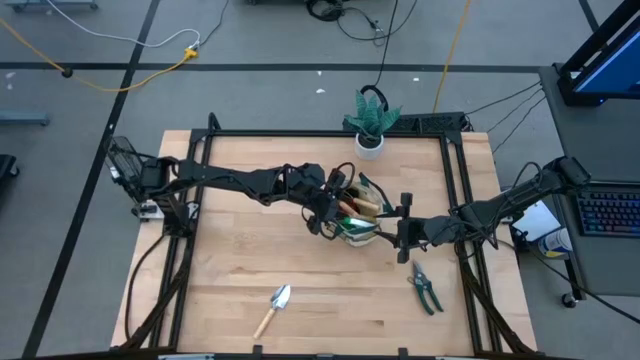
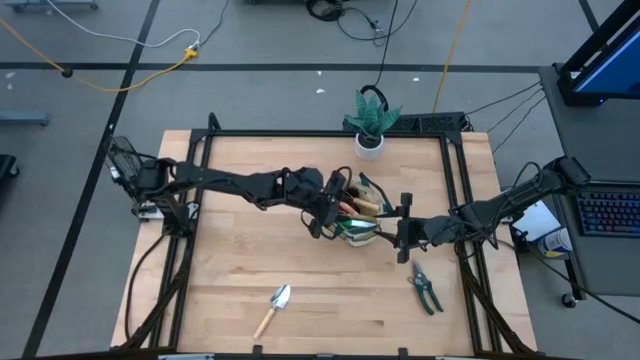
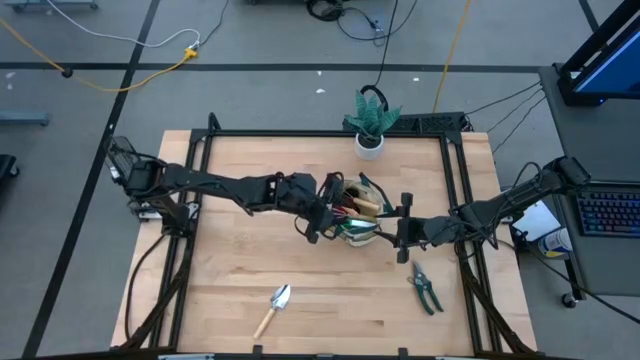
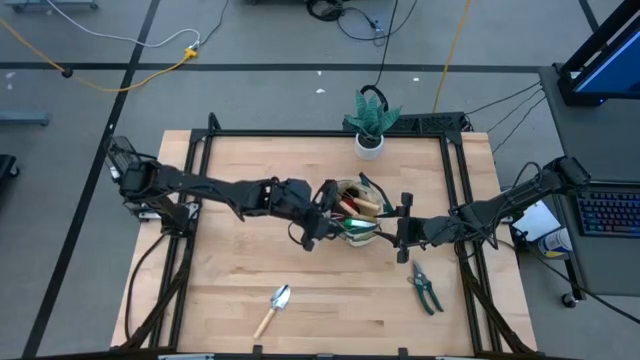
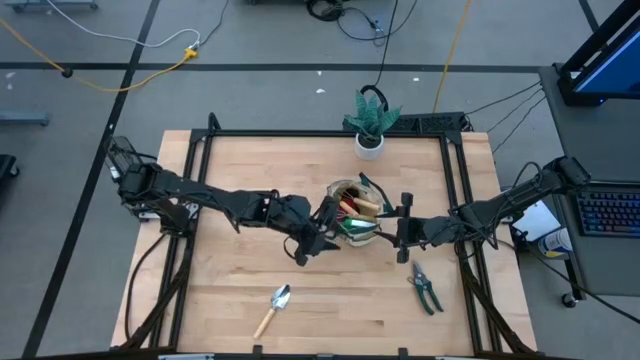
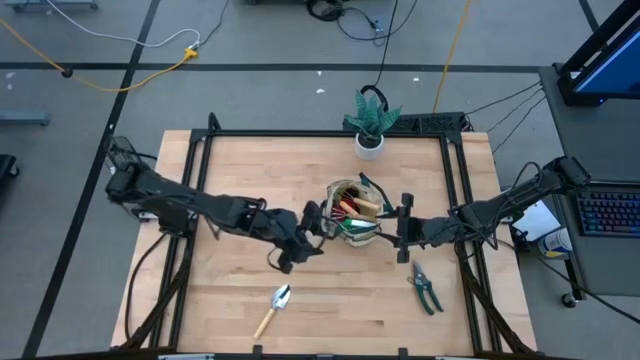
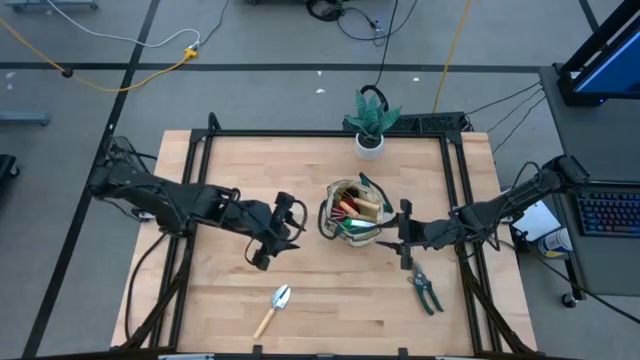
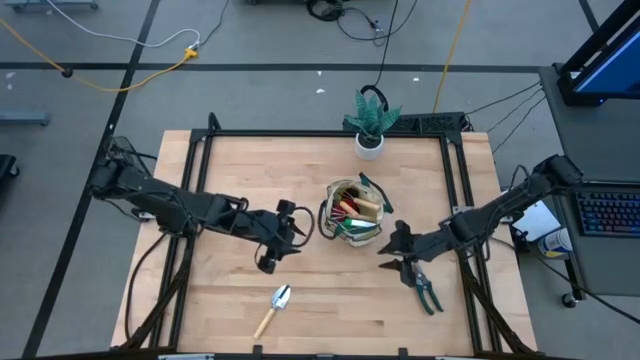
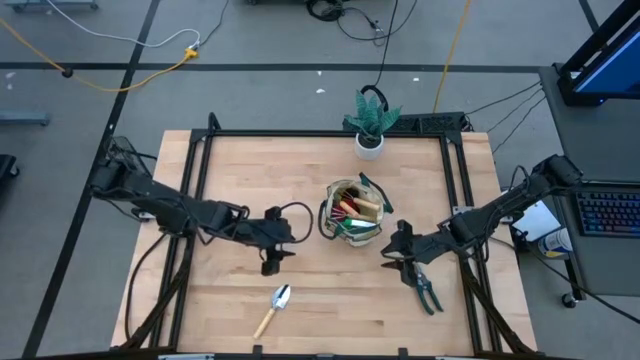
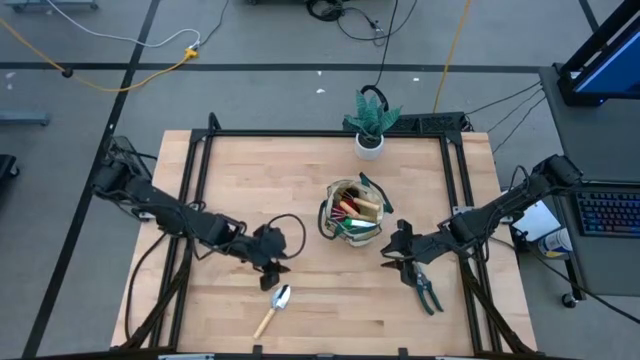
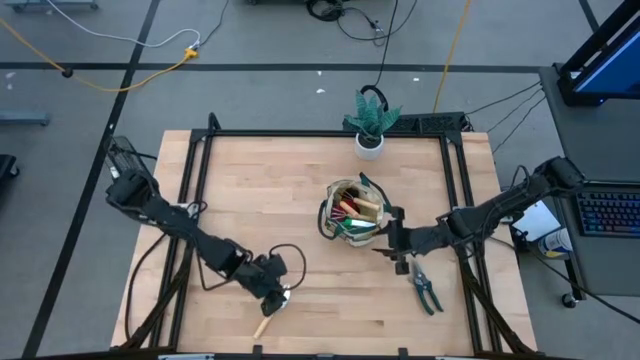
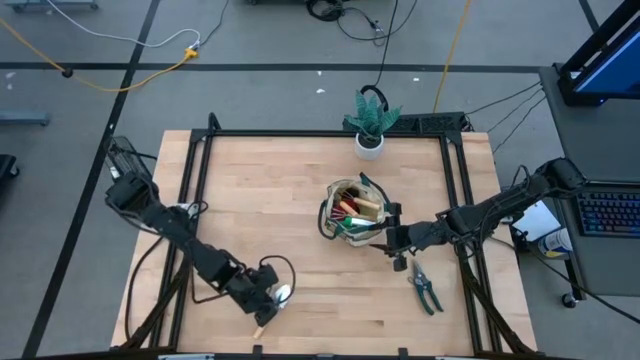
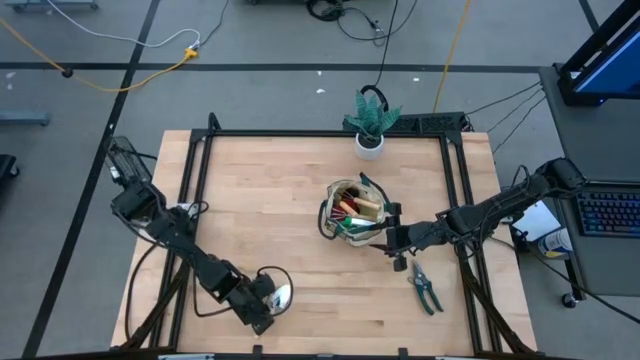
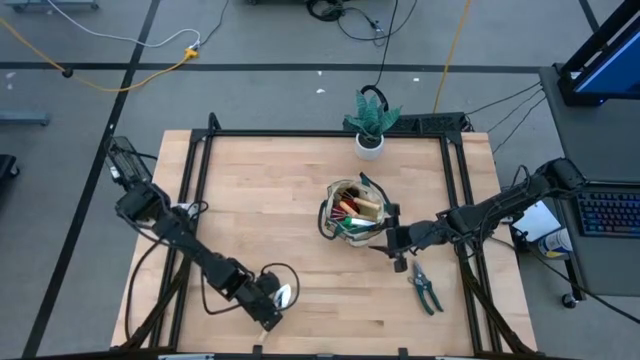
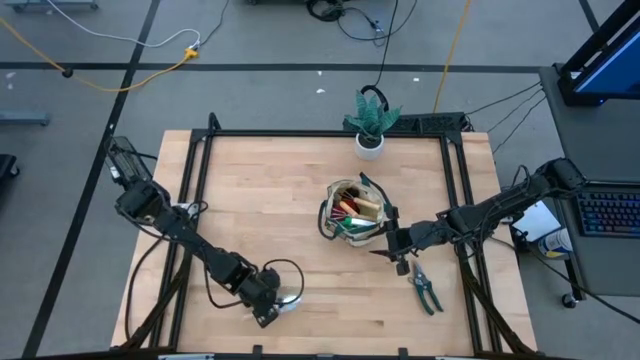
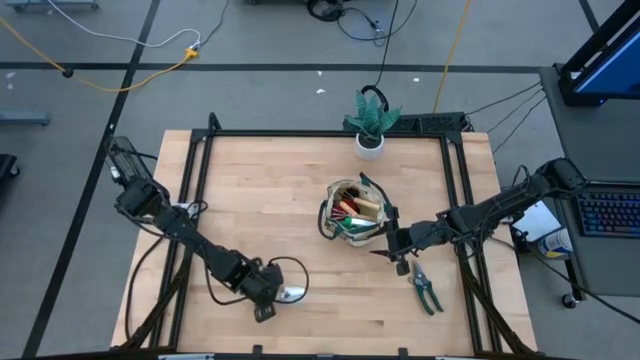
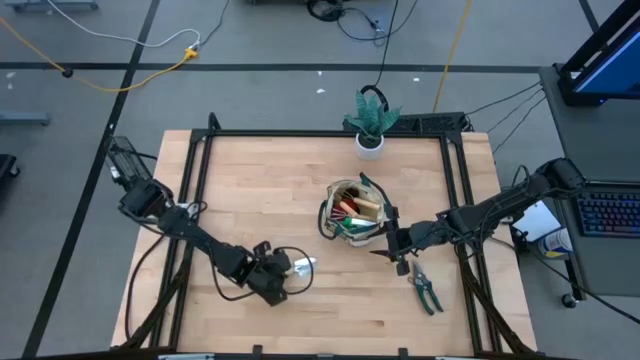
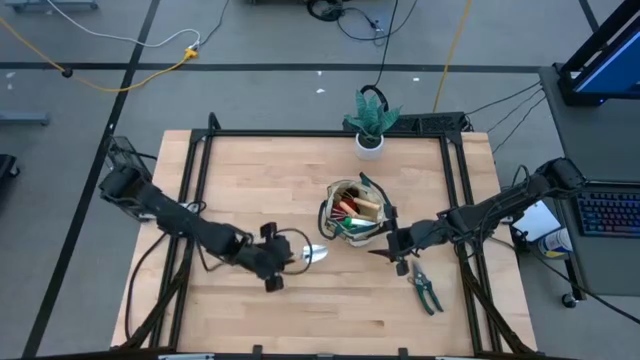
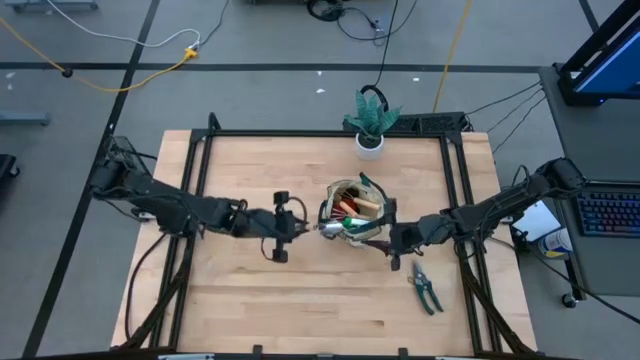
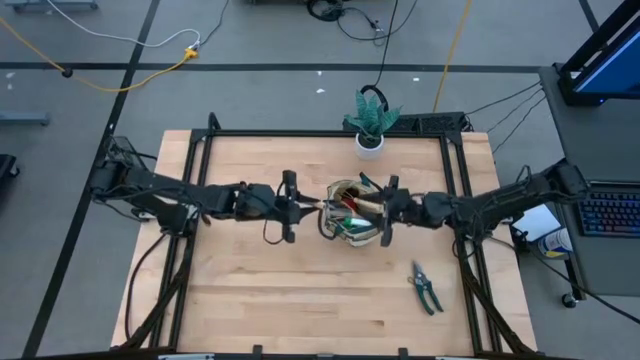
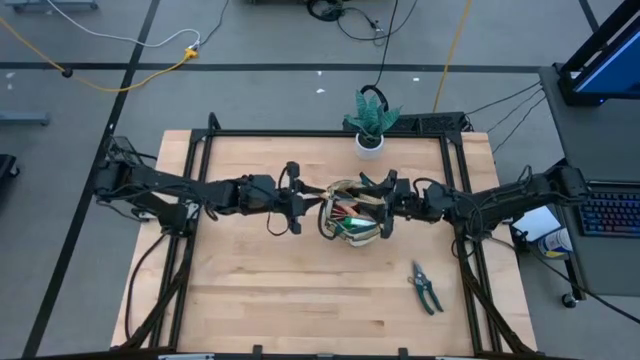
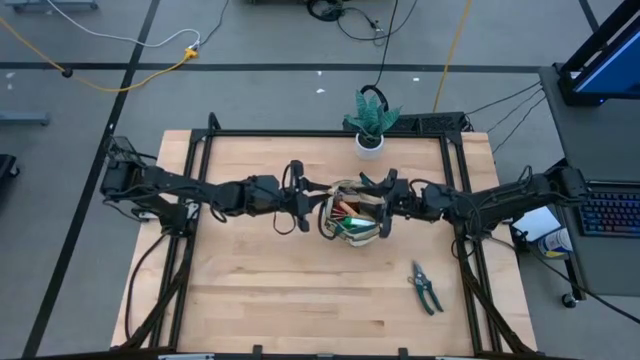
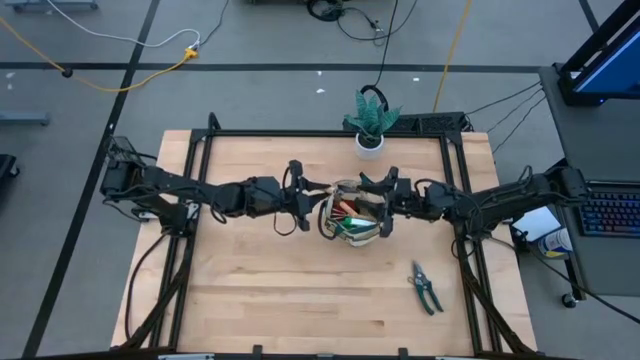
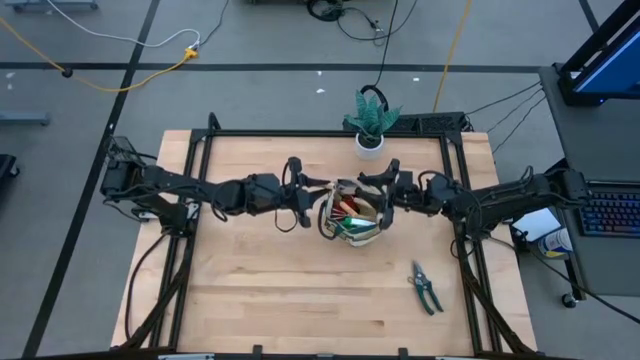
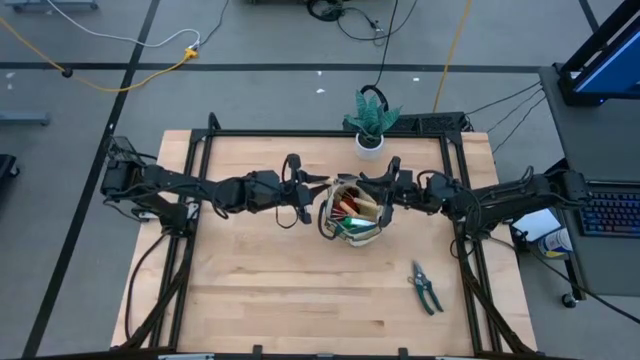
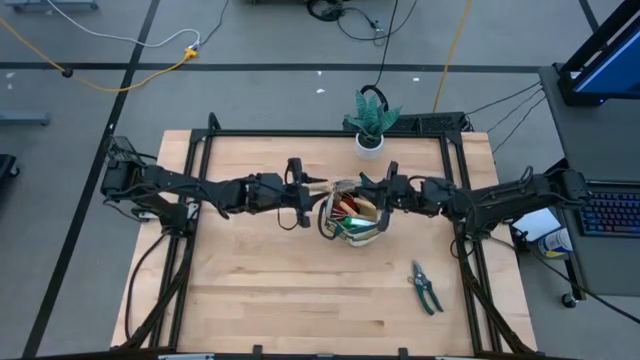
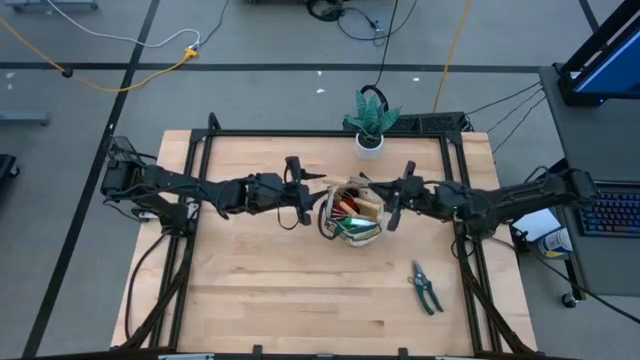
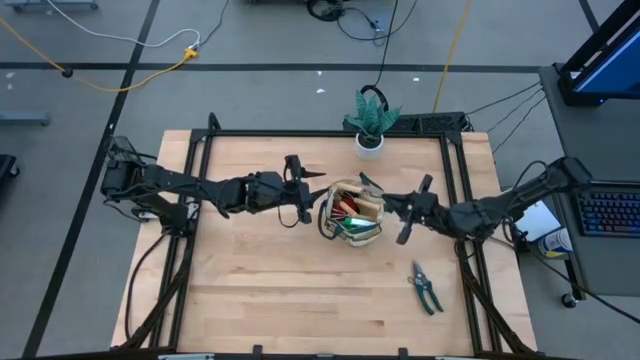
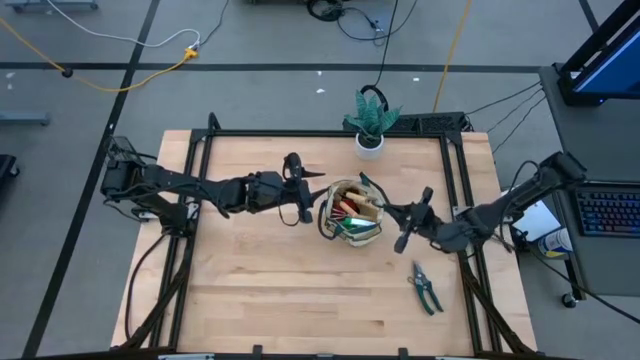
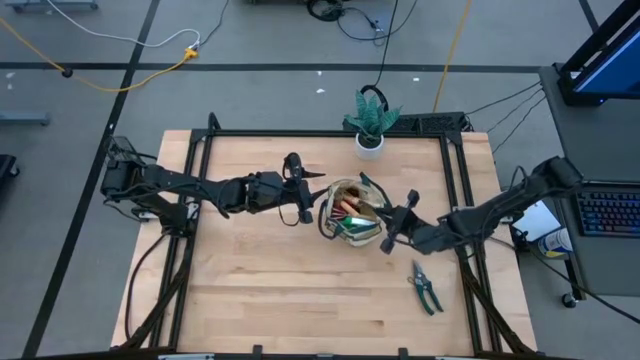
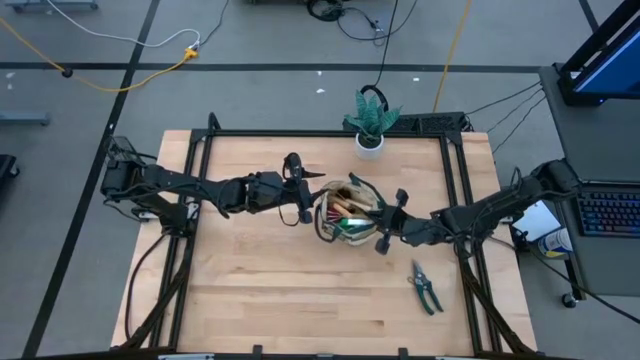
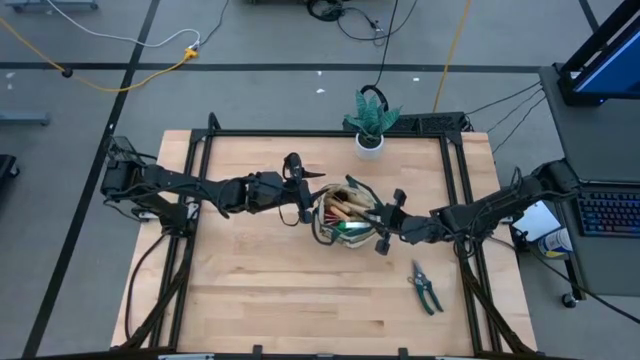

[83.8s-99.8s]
Task: Pick & Place Garden tools in Gardening bag
Put the brown trowel into the gardening bag

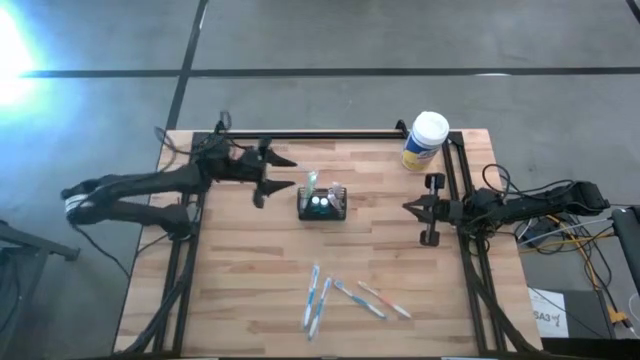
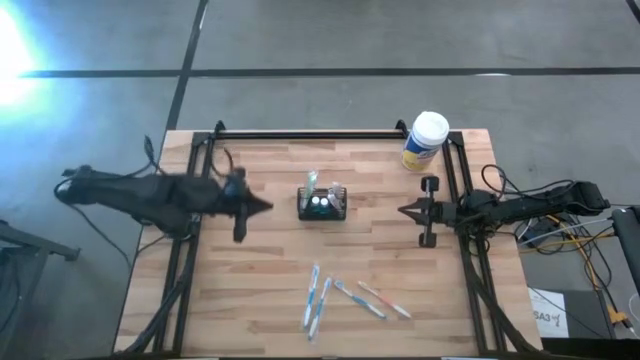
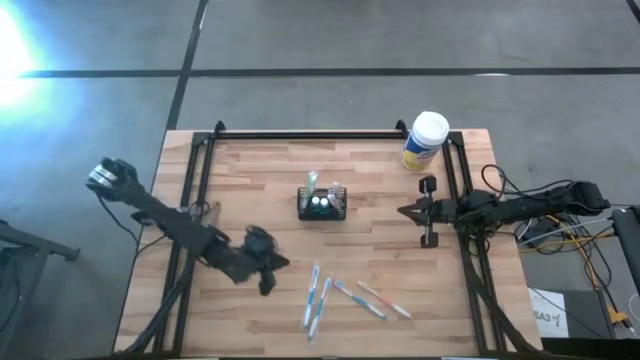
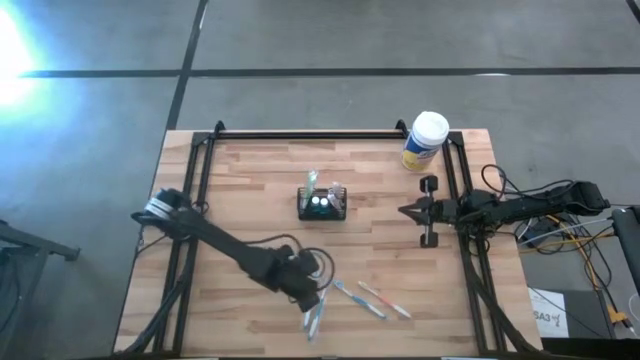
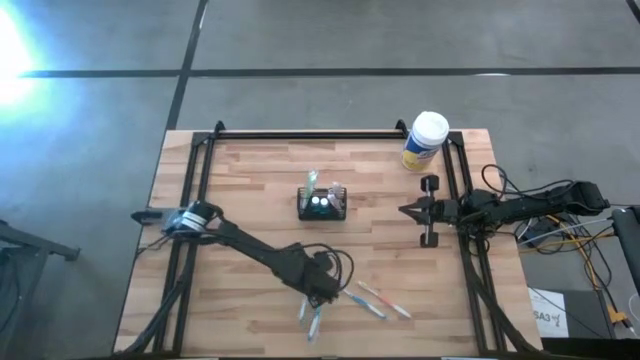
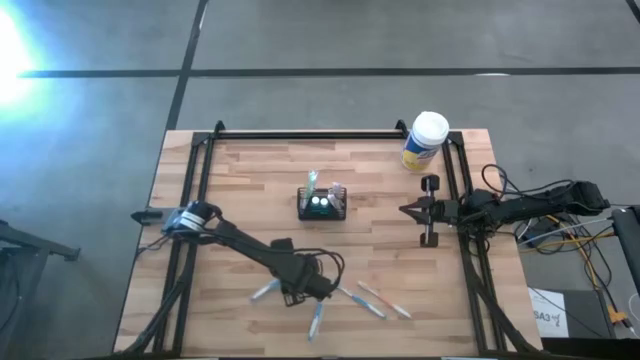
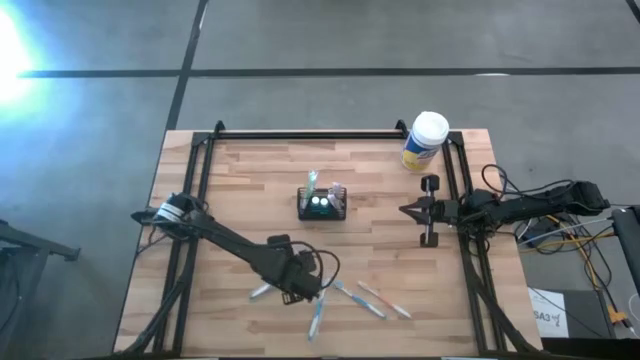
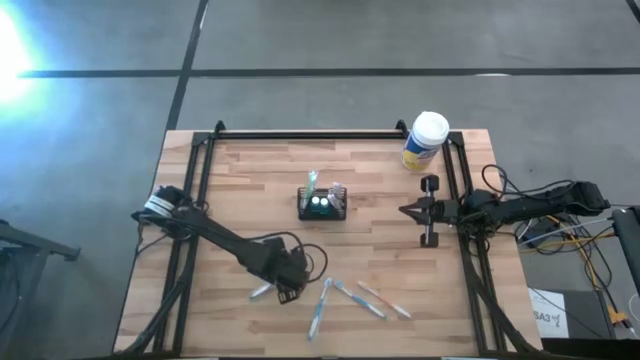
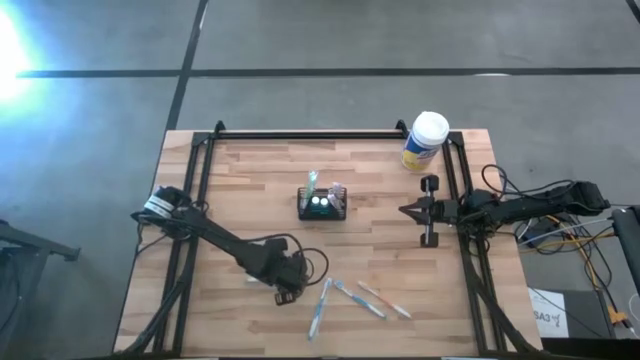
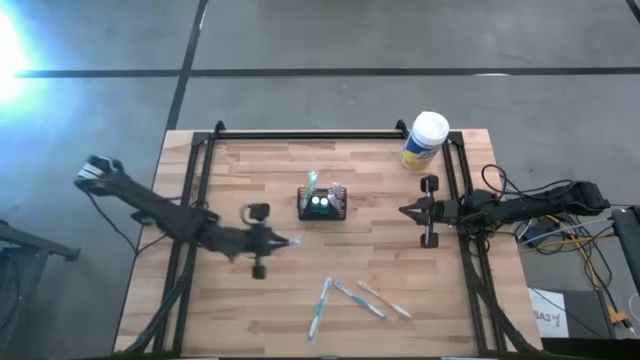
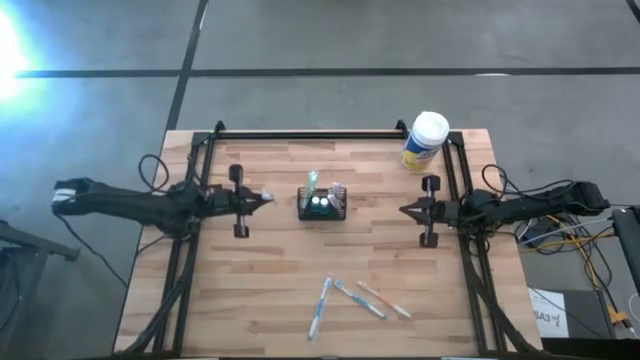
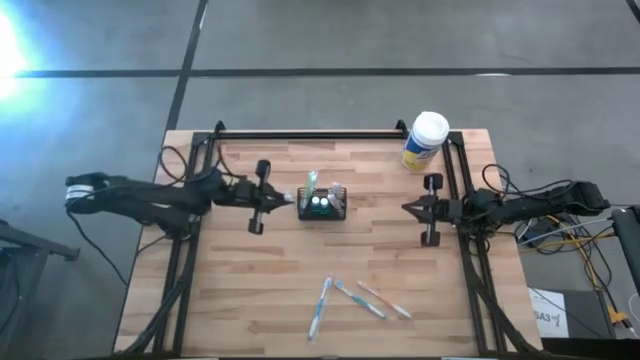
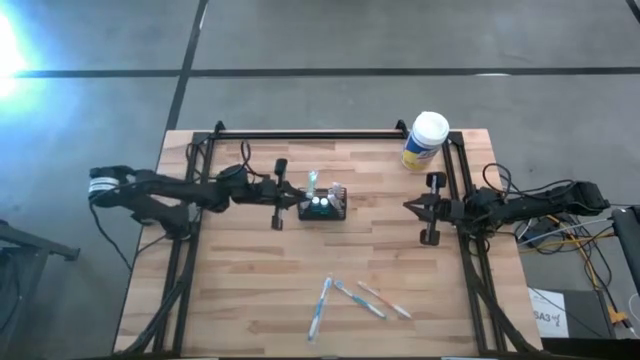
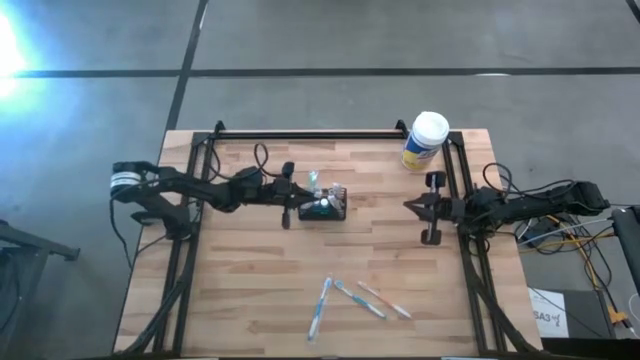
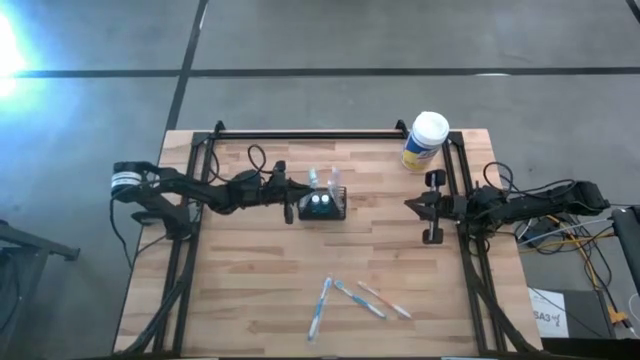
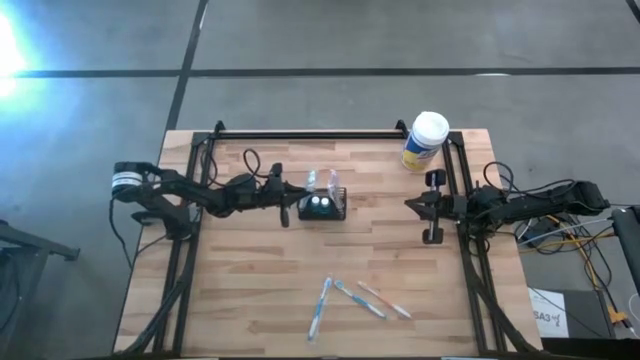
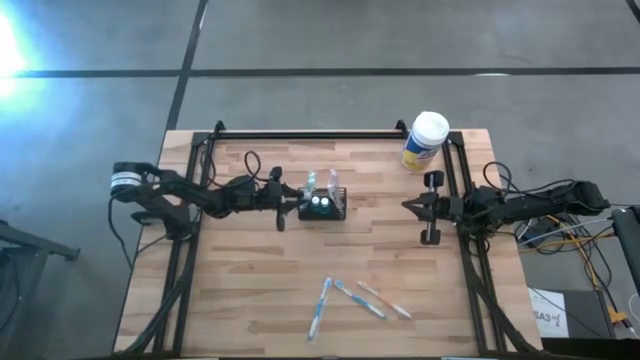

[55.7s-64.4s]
Task: Pick & Place toothbrushing station
Put the left blue toothbrush in the wire organizer
